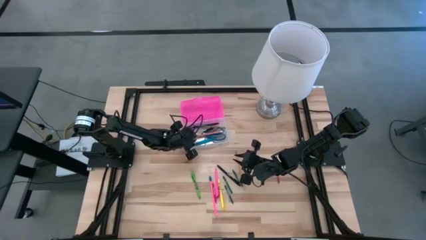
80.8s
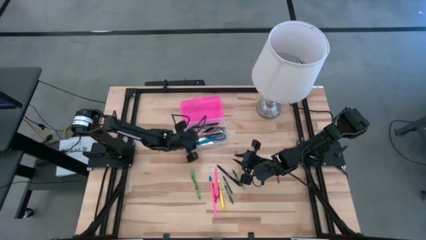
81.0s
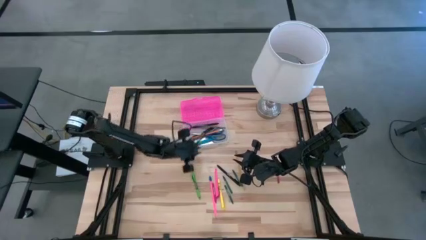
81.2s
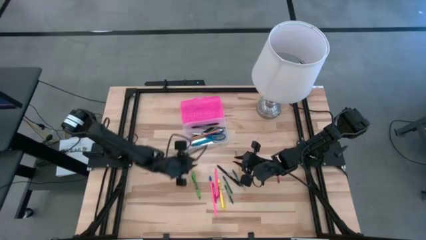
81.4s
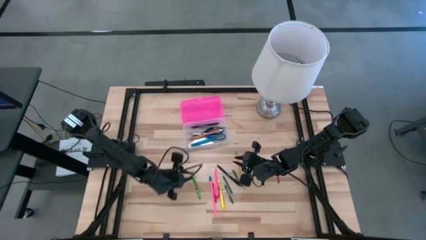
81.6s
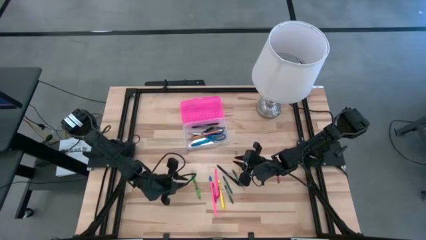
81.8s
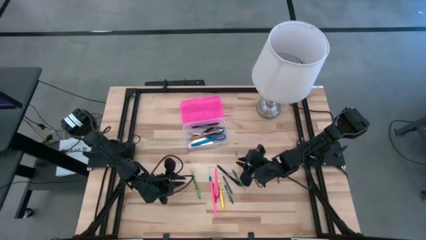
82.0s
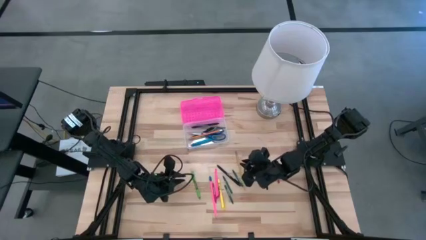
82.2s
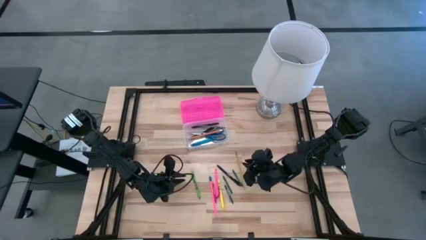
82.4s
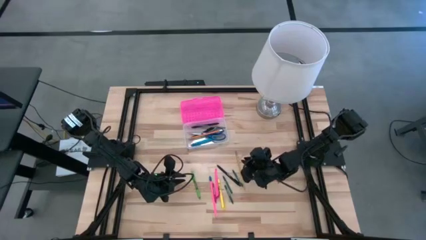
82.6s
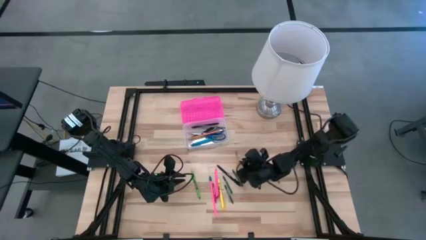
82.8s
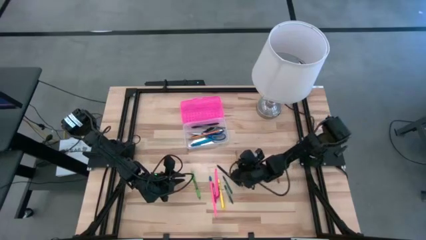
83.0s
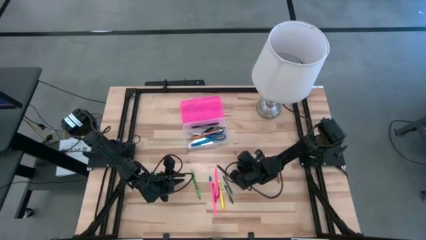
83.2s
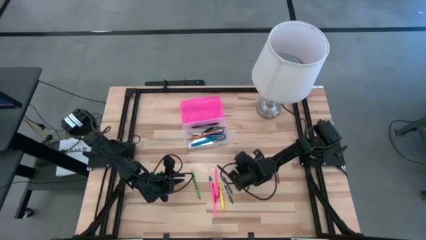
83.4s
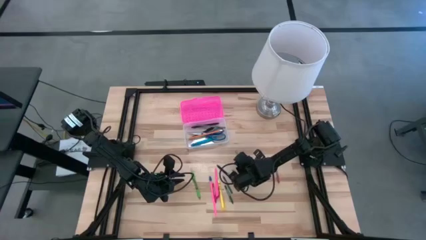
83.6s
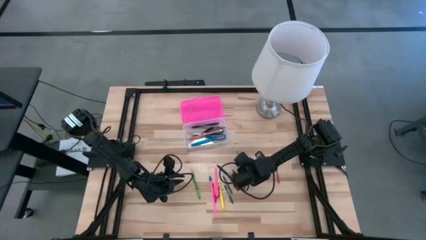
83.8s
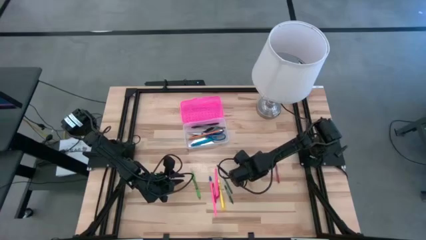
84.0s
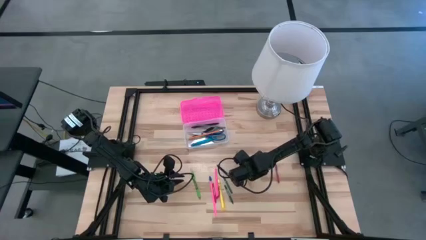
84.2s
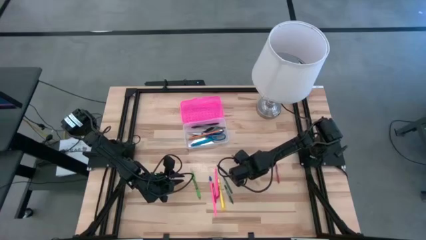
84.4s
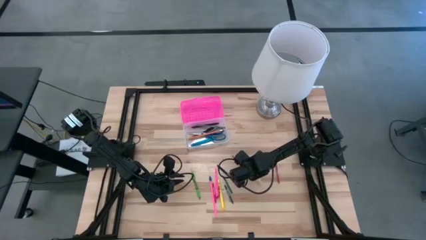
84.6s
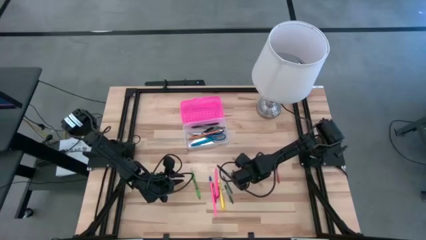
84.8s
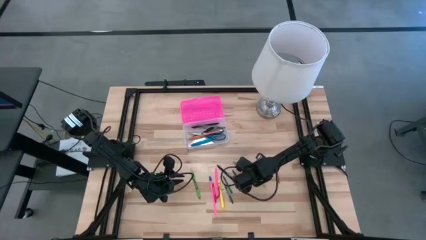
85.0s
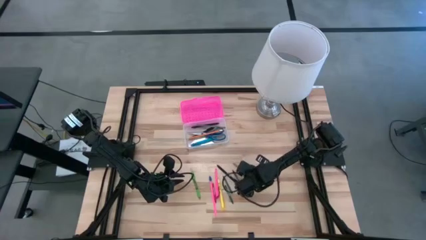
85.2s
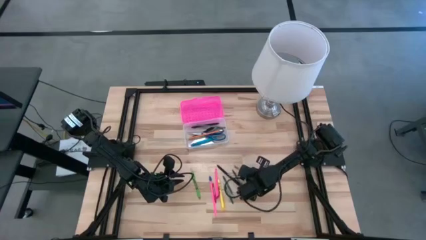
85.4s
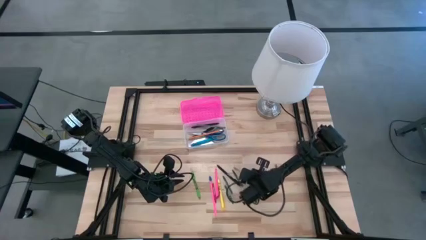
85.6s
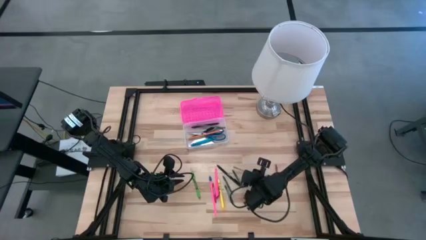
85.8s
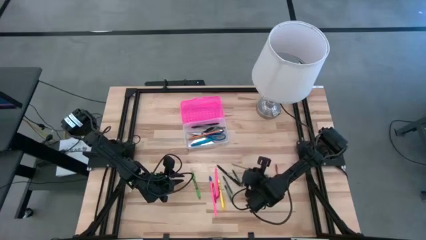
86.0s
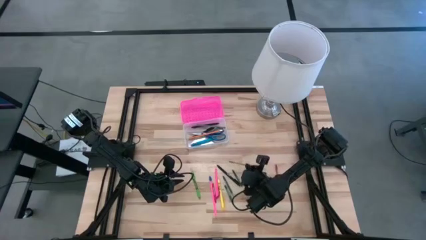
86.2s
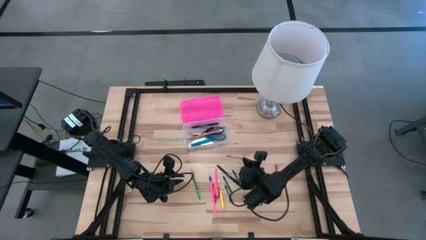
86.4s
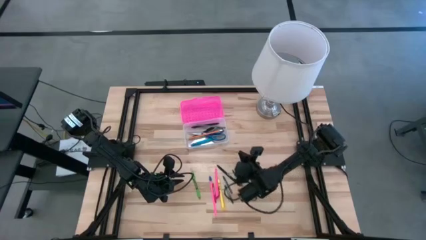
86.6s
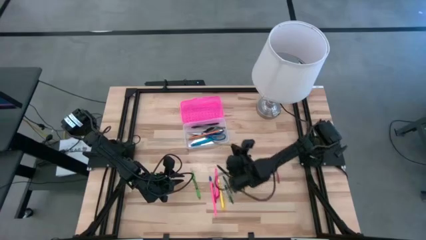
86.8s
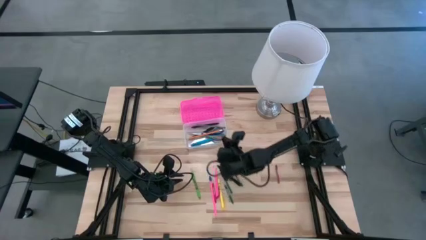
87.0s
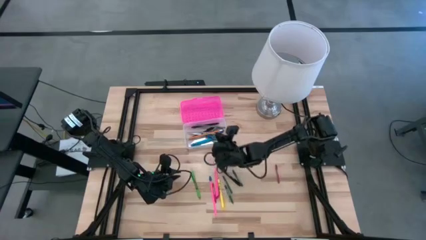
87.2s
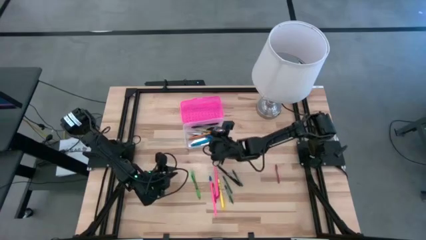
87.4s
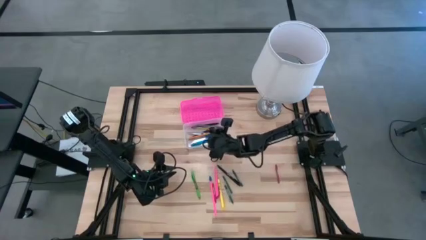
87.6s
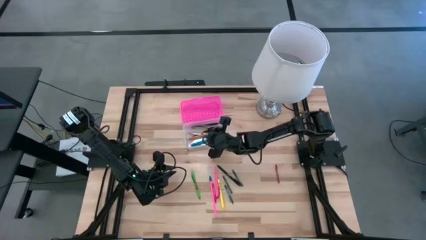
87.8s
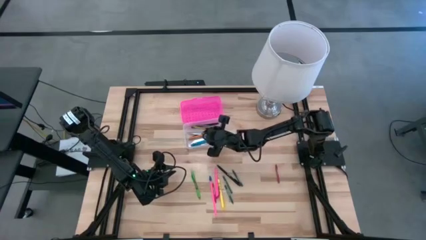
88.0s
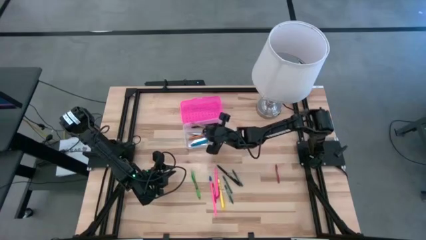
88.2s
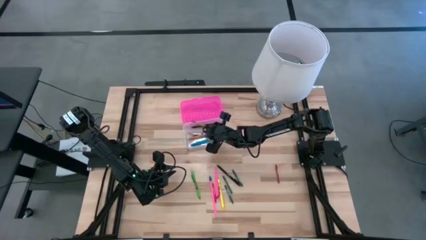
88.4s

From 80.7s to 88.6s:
Task: Pick & place school supplies into a supply box
Put the yellow pencil into the pink supply box

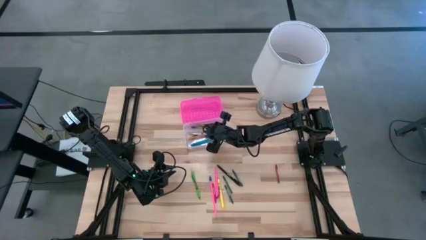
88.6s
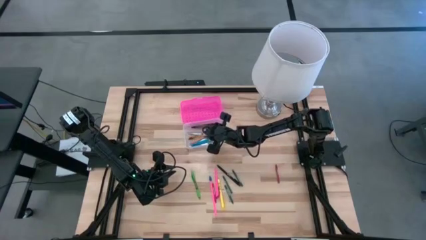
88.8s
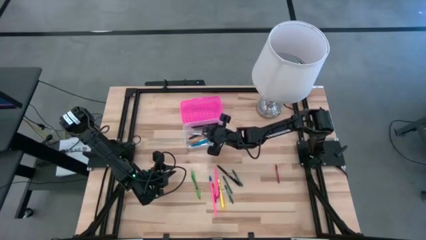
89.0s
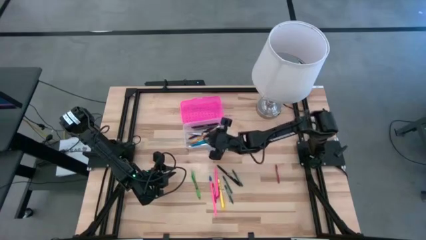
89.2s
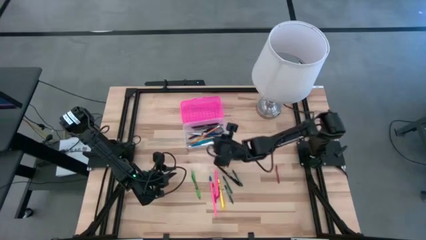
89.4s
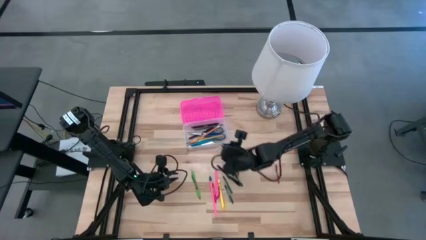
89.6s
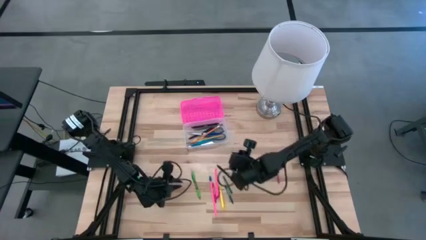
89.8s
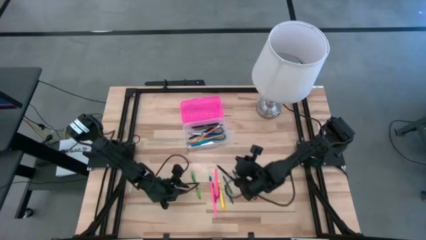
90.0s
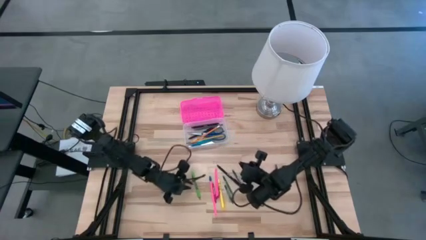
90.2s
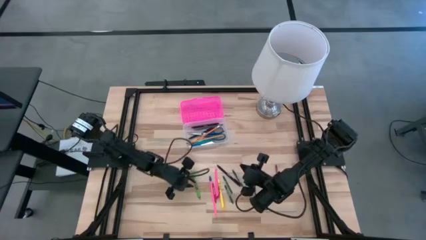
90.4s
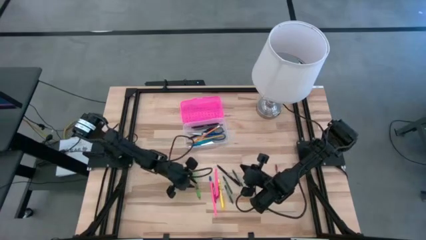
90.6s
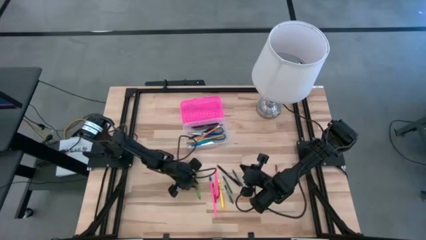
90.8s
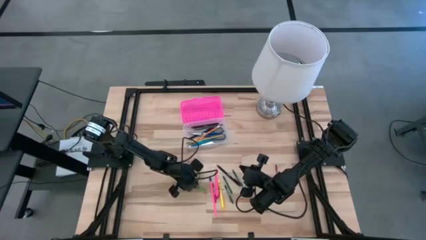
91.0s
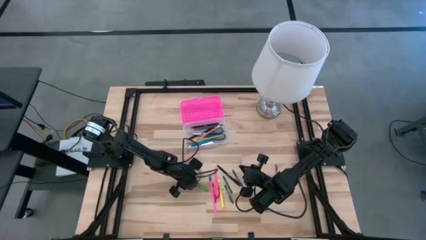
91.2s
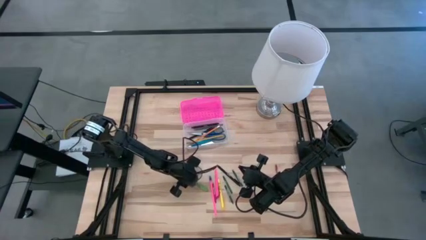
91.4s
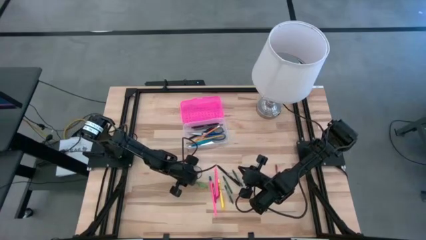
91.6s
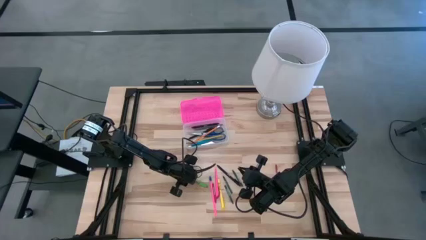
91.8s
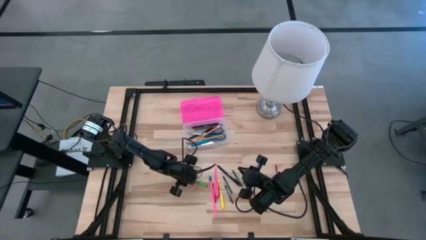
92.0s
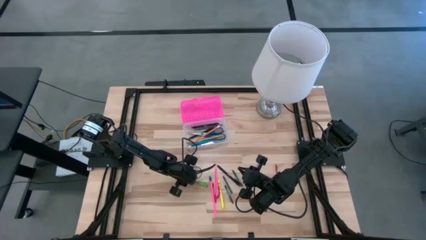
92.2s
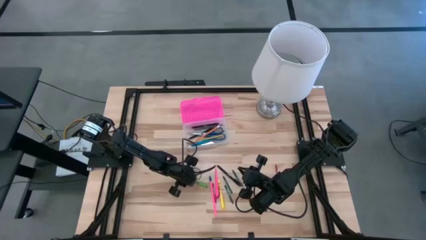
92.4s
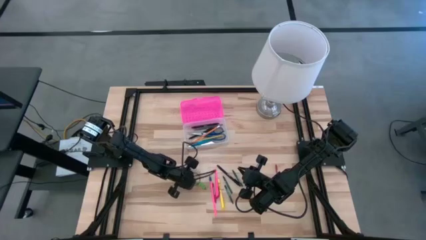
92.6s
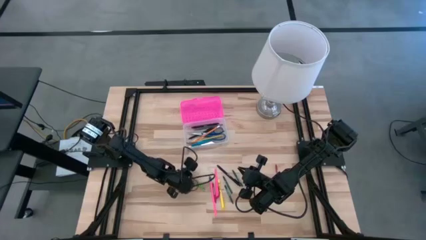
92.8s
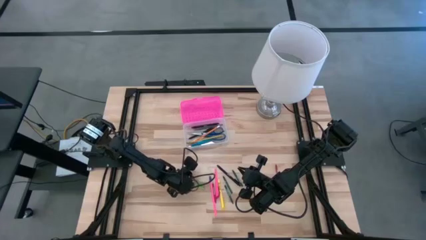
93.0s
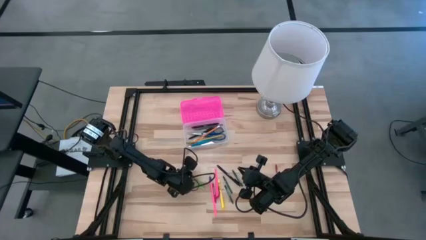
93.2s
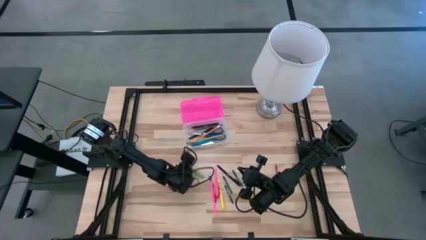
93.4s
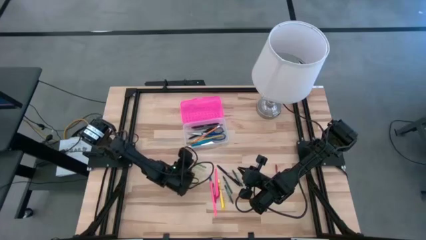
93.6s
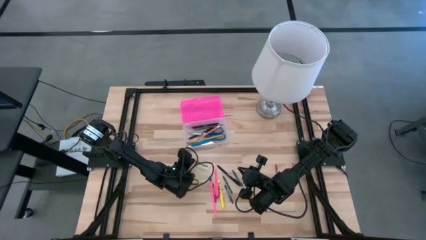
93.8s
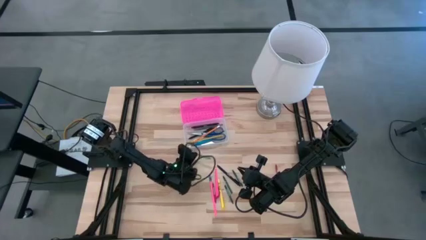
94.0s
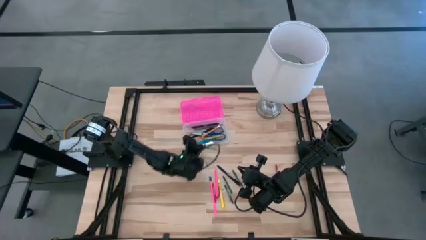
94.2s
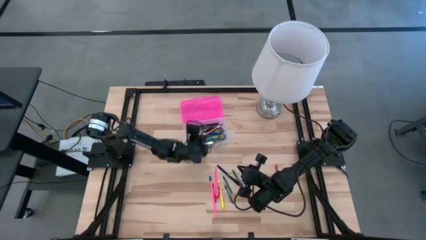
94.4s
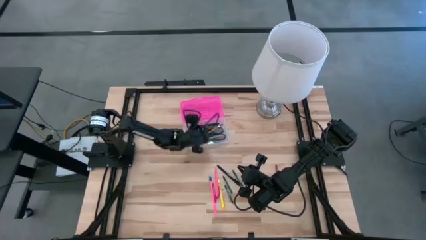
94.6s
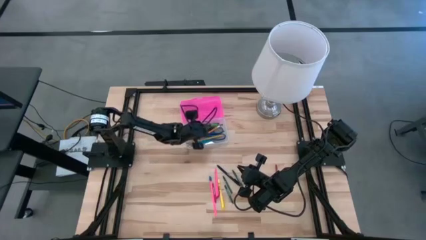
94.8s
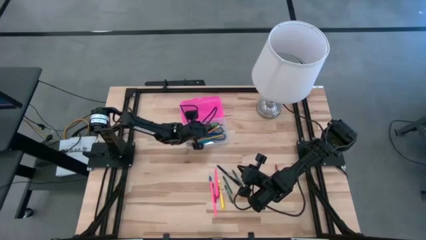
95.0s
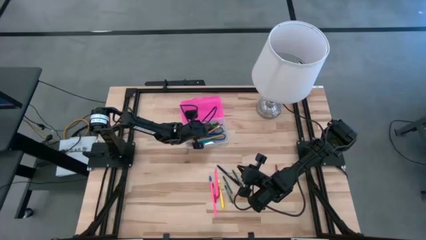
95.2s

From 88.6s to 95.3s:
Put the green pen into the pink supply box

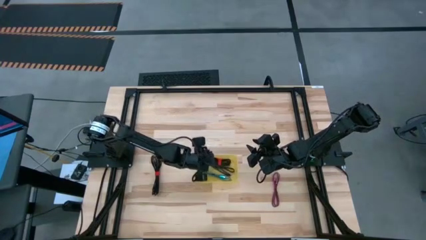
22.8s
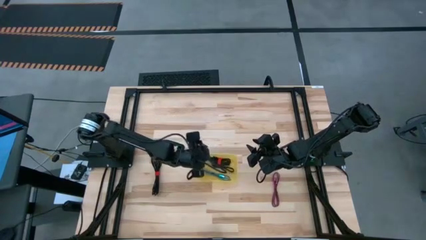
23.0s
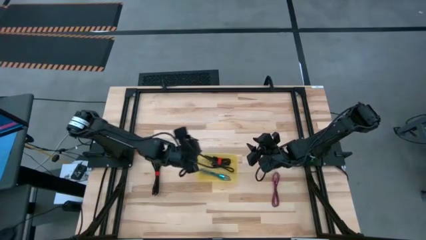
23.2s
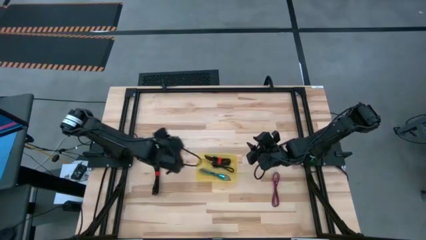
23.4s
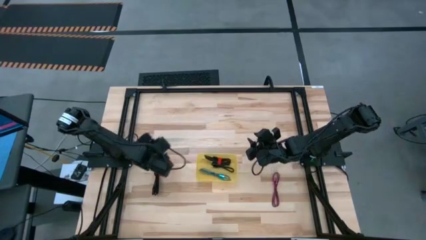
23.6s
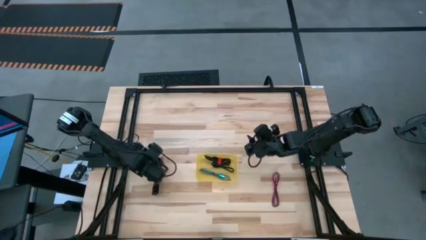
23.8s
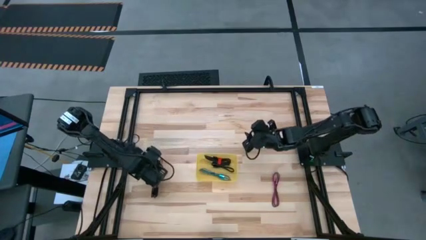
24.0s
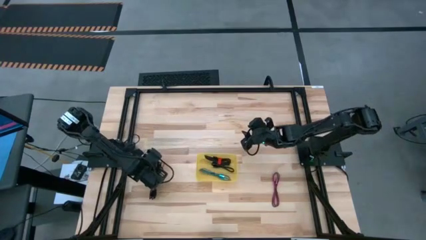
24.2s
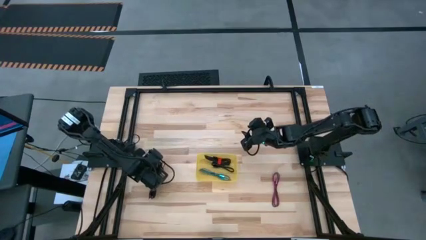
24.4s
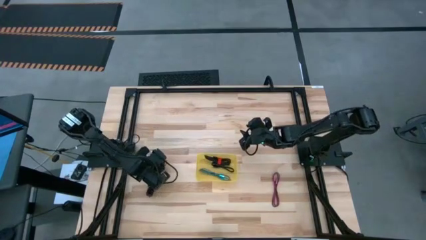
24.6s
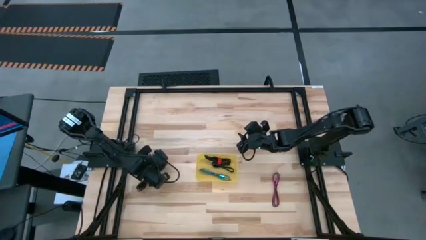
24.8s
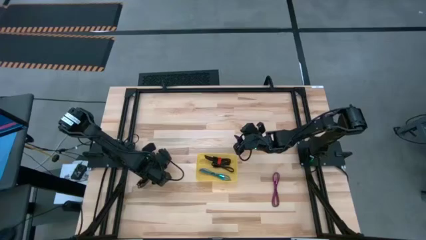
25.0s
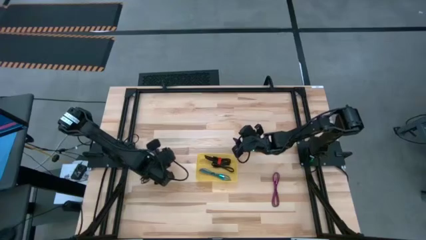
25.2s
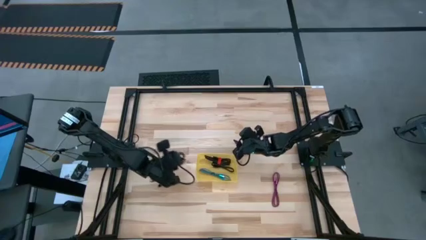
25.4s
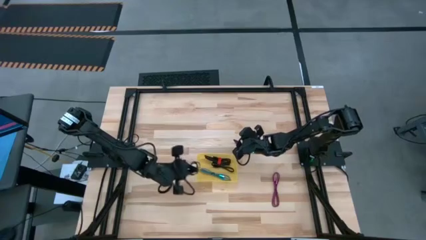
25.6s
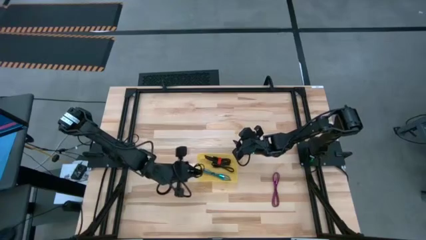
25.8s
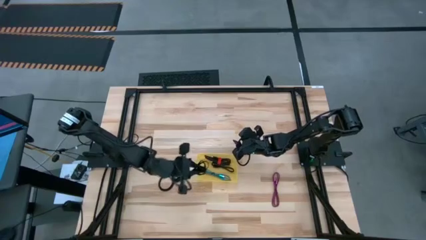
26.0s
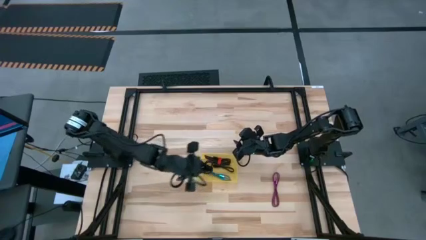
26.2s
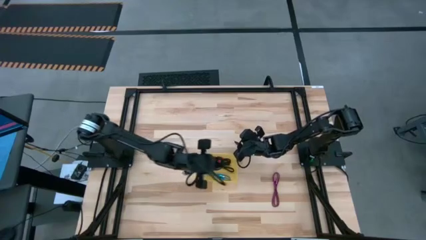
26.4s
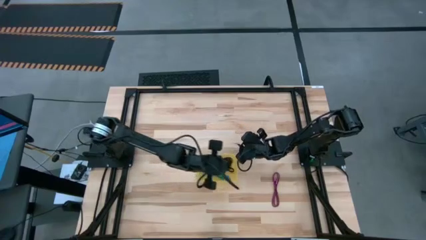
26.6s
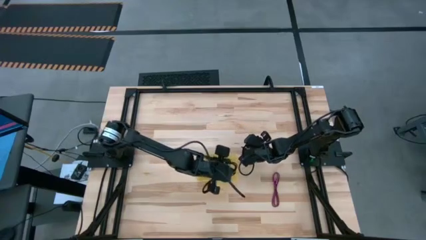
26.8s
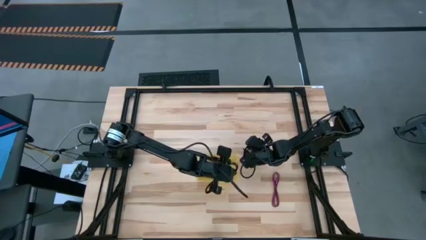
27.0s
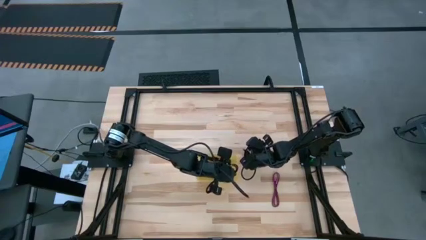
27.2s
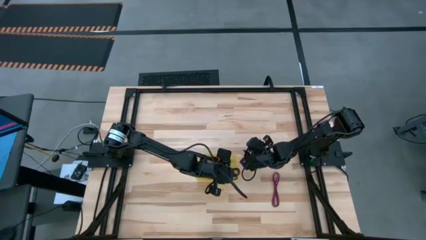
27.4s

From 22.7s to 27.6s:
Task: Pick and place USB-C Cables
Put the black charger cable into the yellow bin
